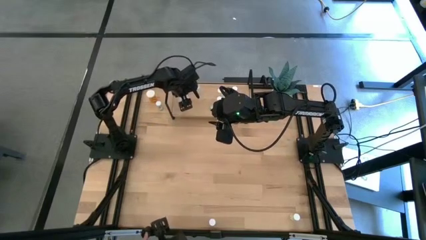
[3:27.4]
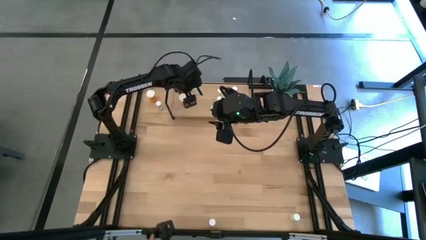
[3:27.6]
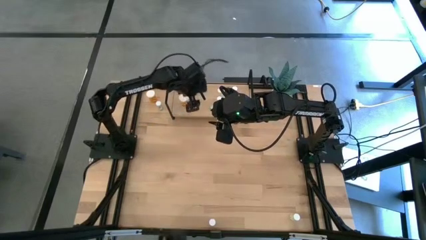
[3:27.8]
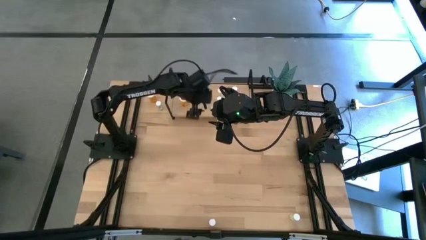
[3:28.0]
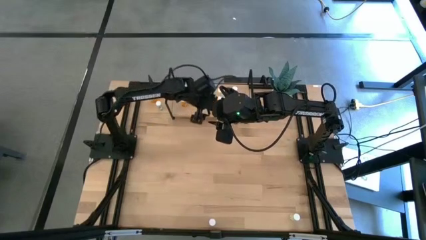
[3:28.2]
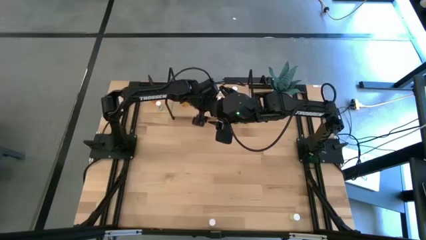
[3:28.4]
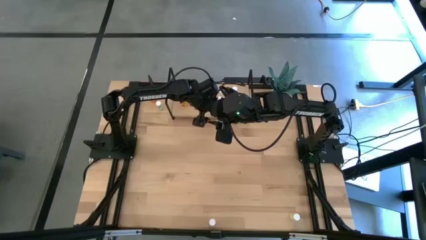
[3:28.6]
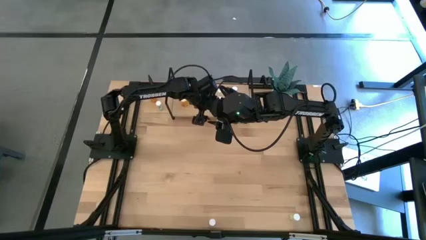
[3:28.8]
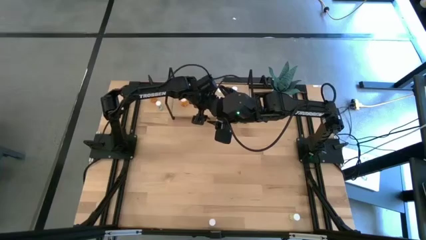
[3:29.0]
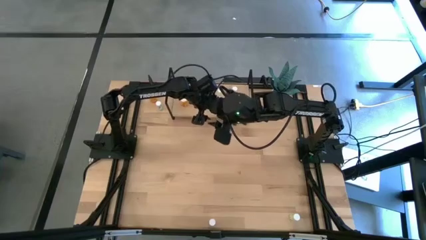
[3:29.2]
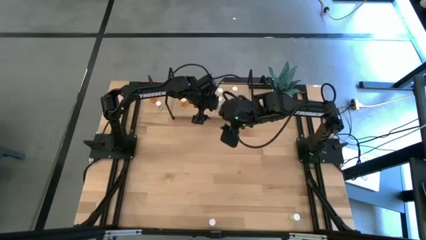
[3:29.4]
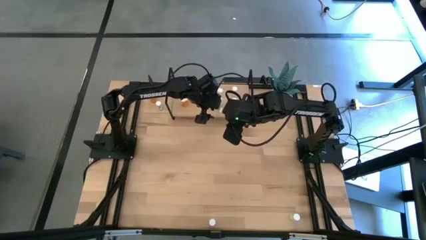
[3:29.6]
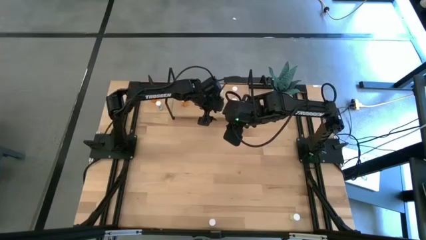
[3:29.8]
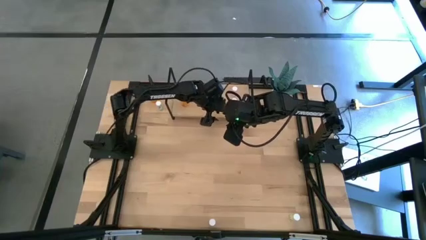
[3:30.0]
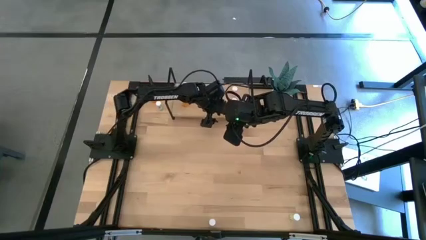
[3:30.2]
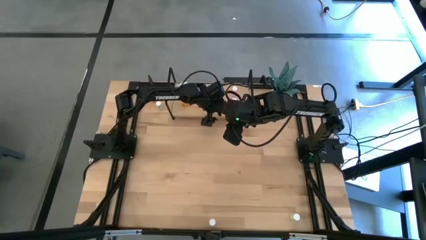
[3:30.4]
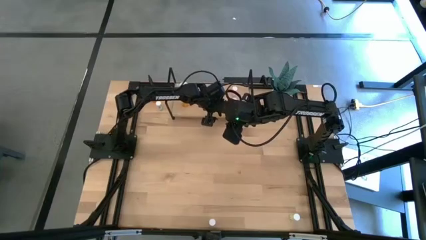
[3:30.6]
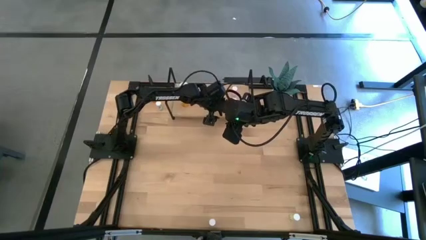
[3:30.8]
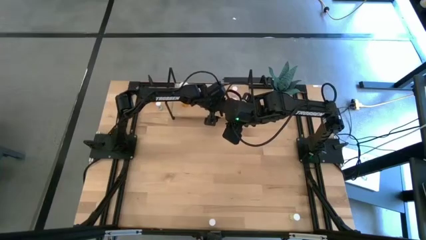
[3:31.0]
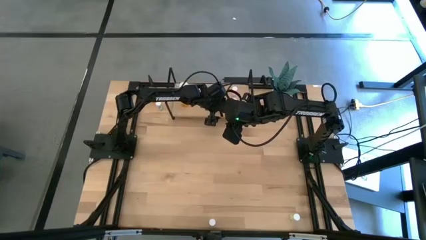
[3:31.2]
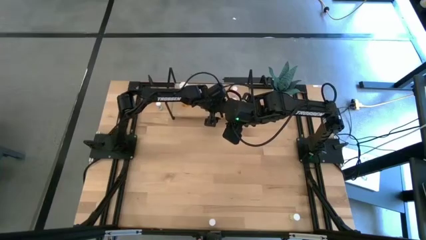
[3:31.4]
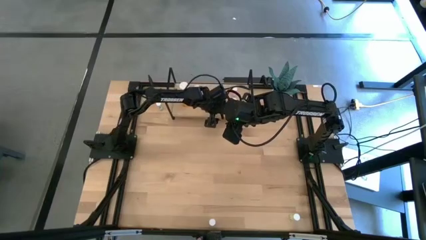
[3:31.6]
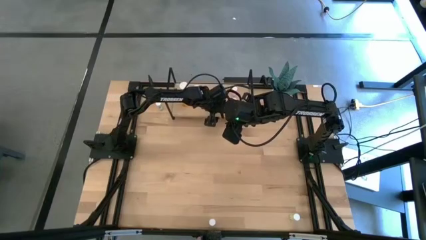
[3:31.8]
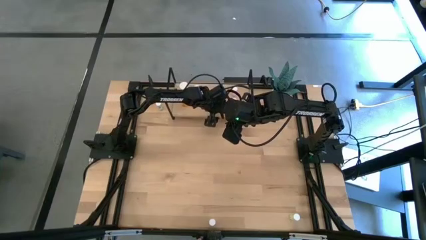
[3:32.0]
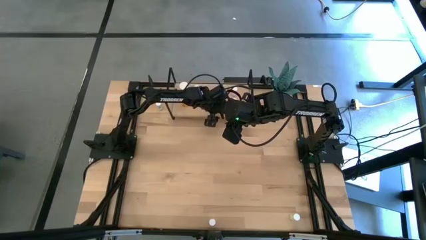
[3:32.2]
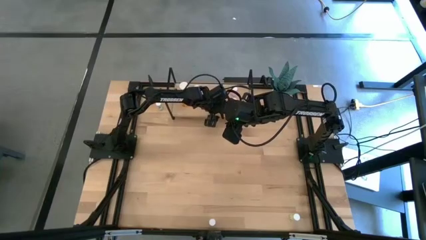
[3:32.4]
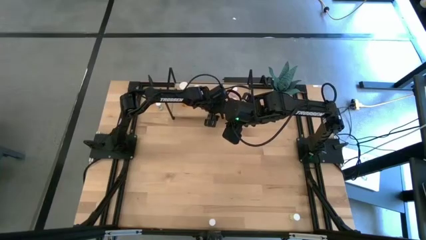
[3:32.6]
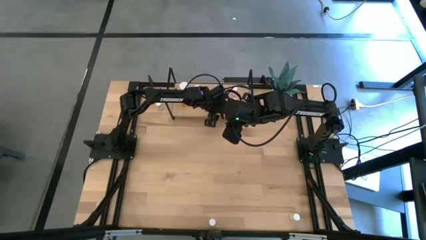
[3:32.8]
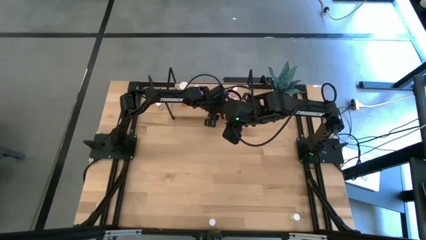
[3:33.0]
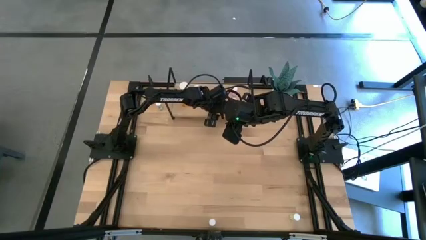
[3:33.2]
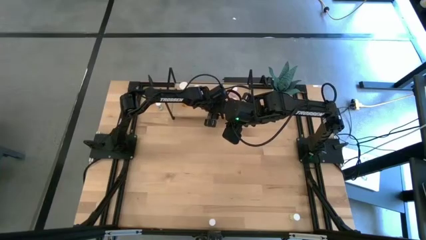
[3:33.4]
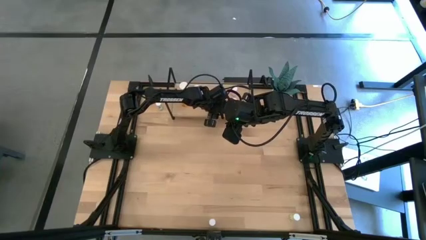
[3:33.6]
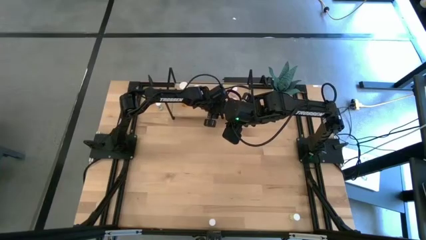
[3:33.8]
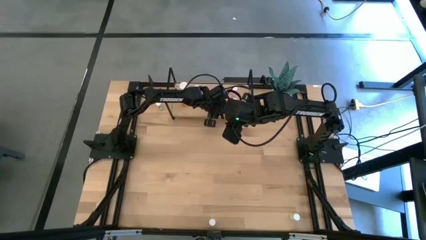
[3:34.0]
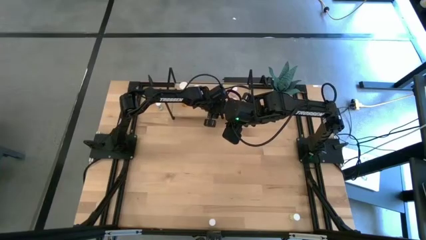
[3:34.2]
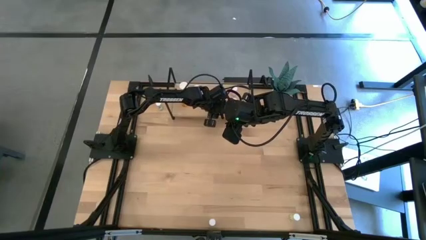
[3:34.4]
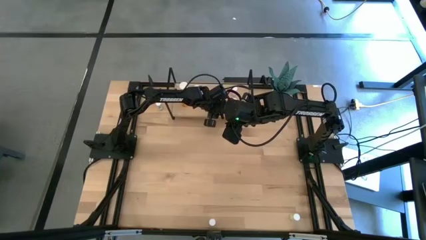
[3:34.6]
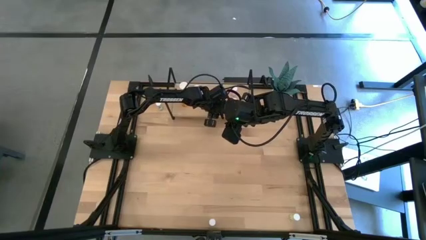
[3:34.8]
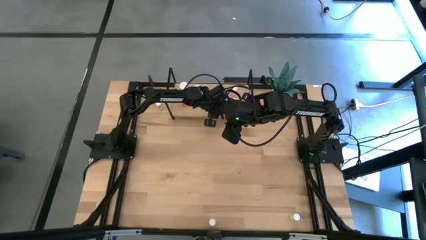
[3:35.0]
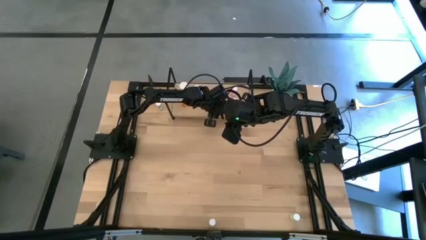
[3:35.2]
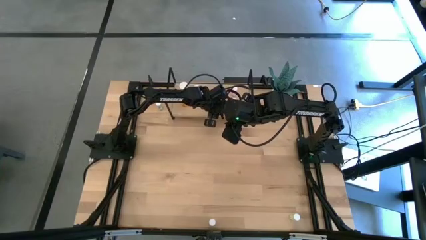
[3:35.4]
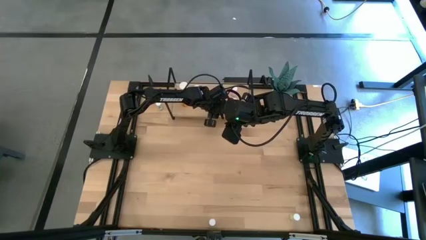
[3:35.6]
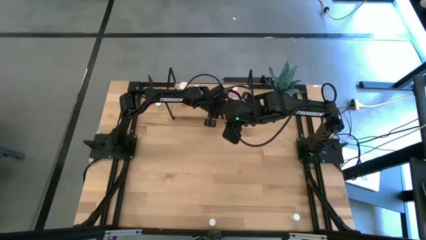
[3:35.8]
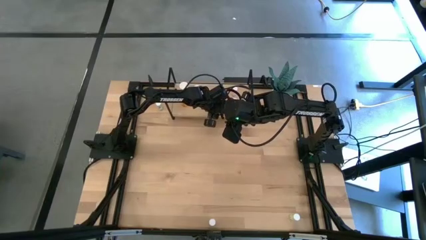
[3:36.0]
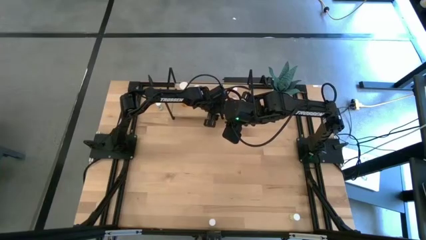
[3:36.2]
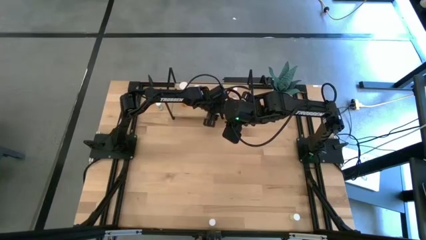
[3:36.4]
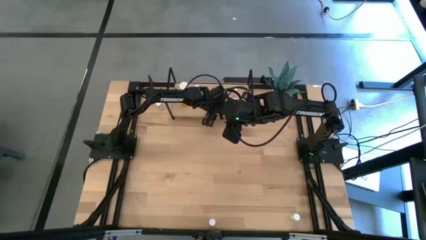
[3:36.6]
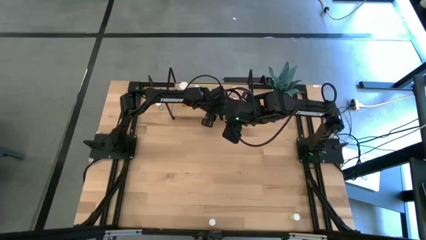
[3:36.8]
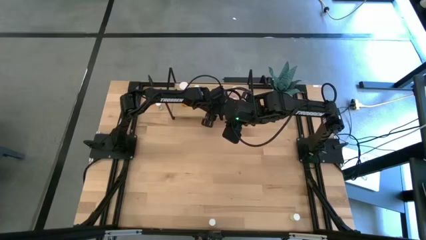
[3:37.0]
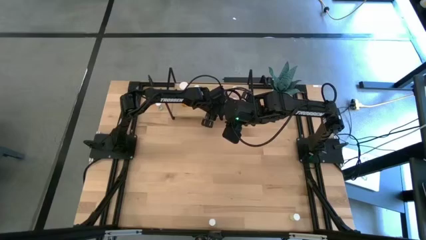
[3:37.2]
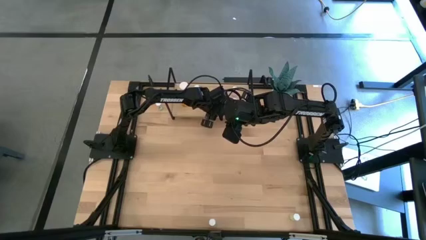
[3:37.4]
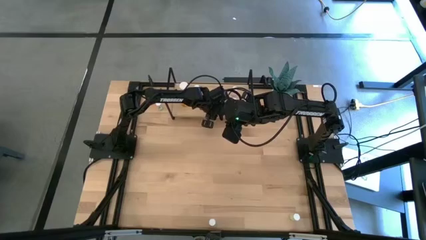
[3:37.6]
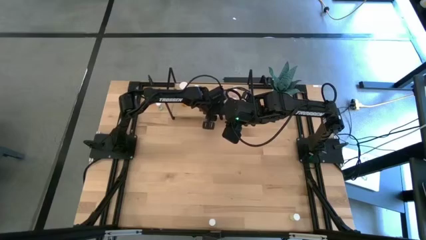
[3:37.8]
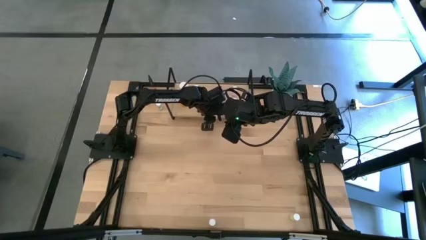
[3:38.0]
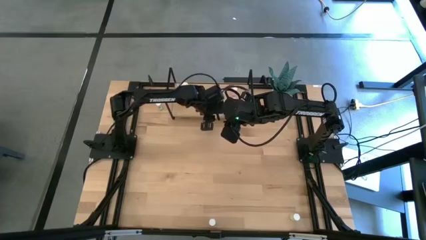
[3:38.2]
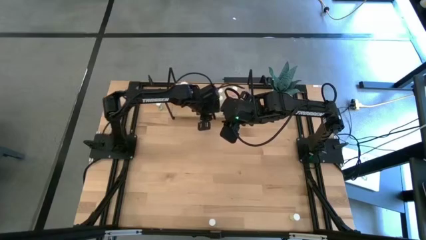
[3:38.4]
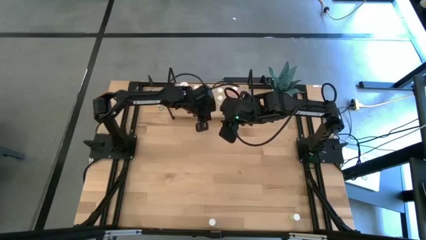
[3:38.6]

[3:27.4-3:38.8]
Task: Pick and place medicine bottles onto shelf by color
Remove the blue pill bottle from the shelf
